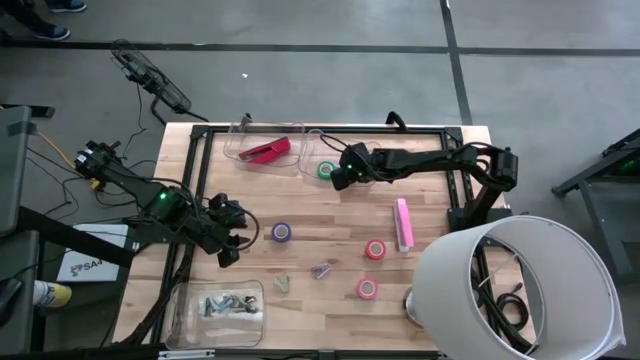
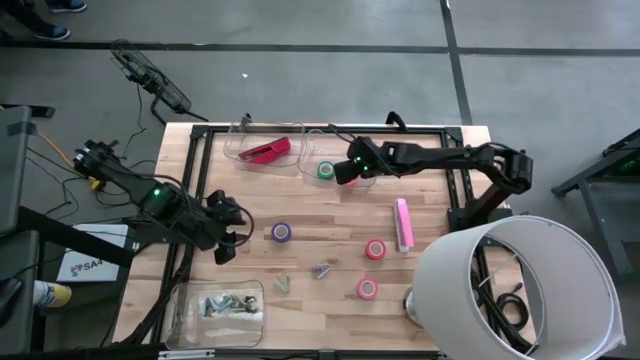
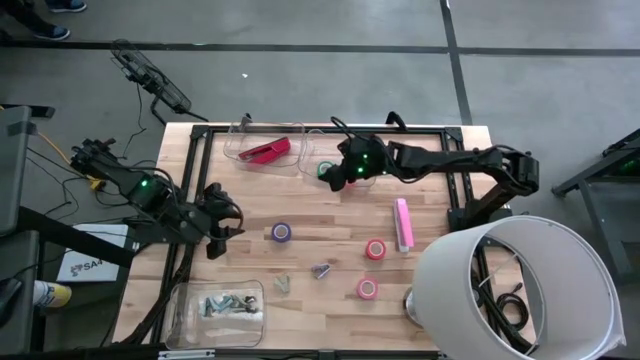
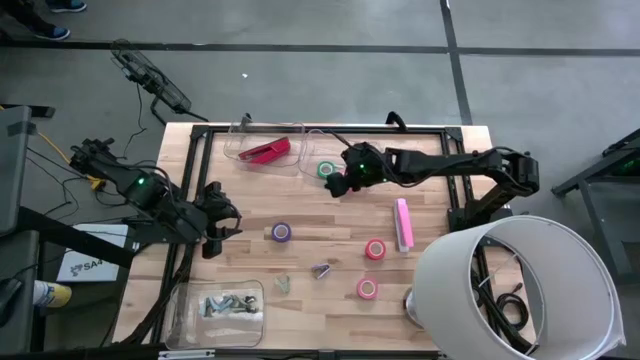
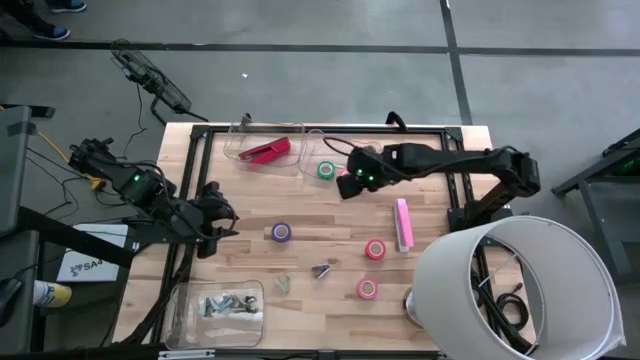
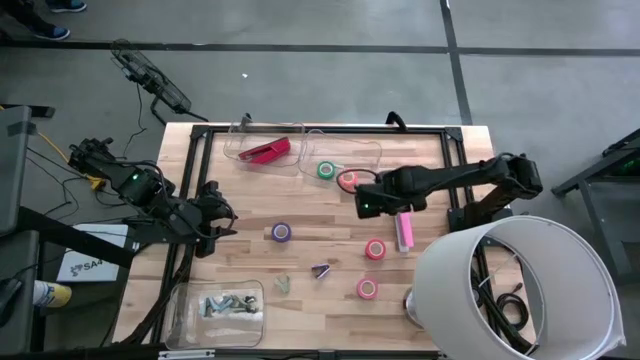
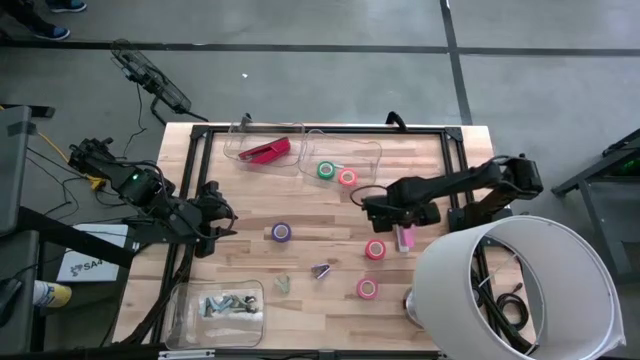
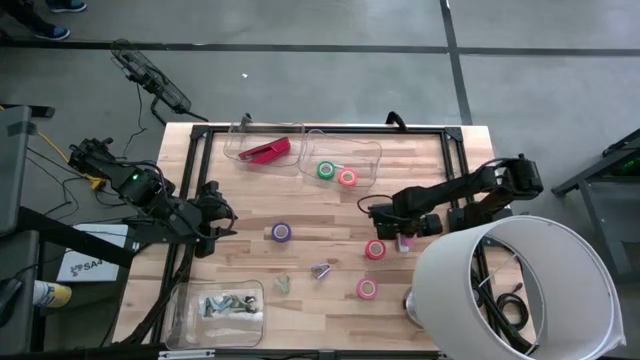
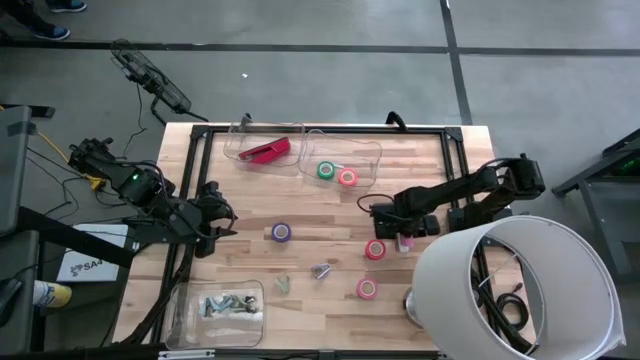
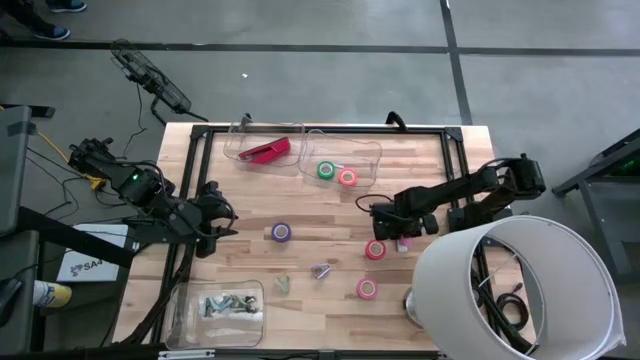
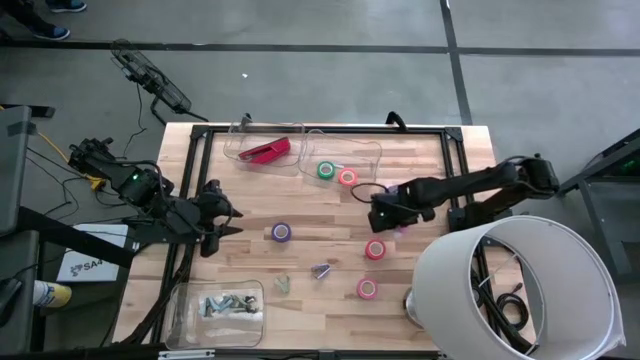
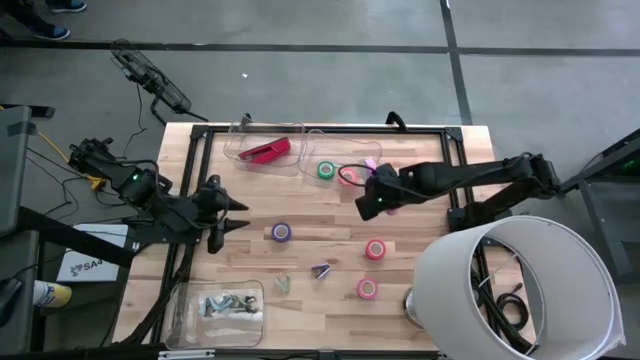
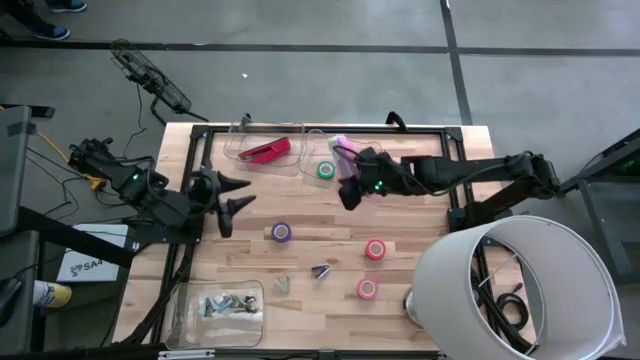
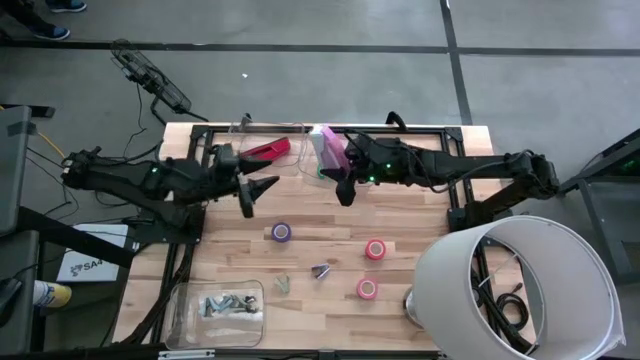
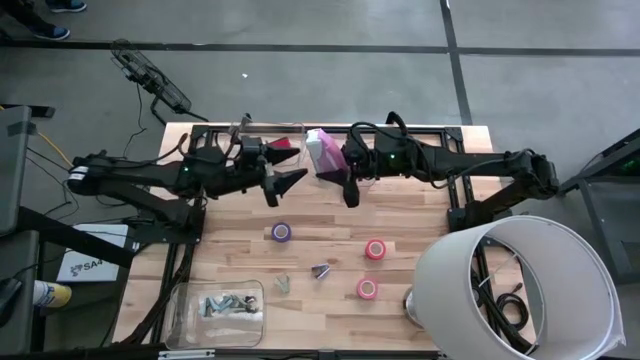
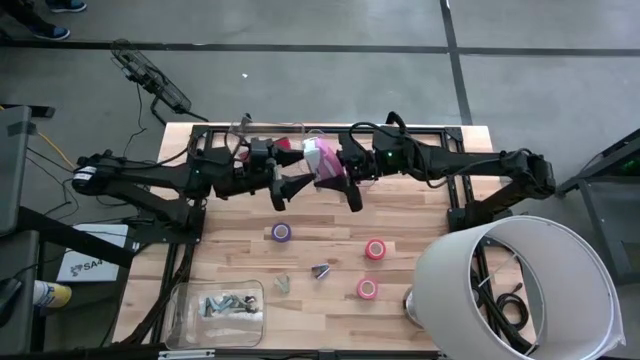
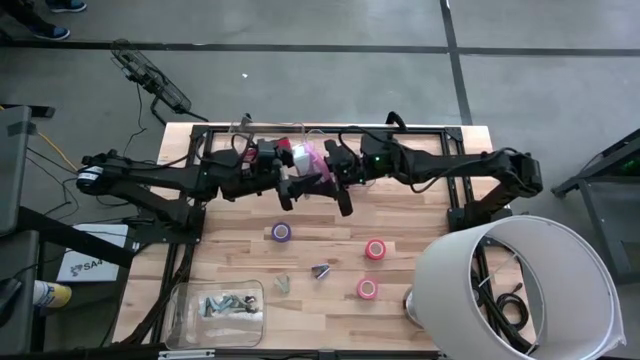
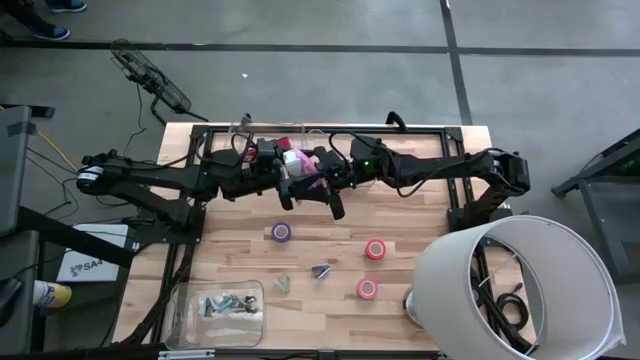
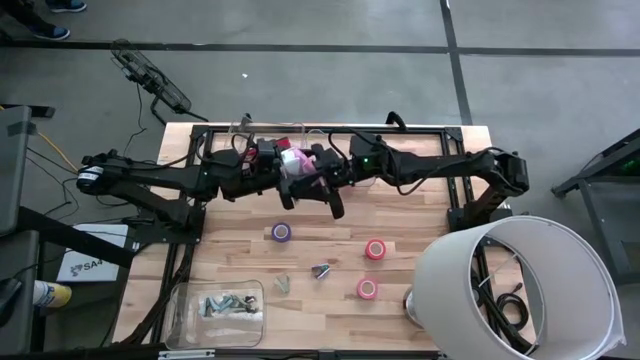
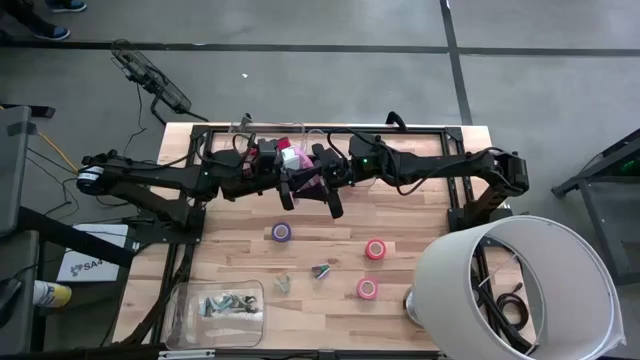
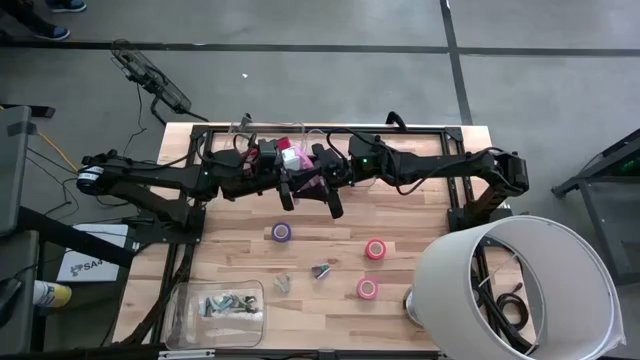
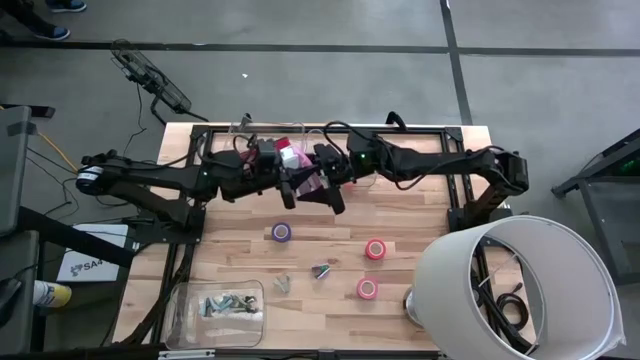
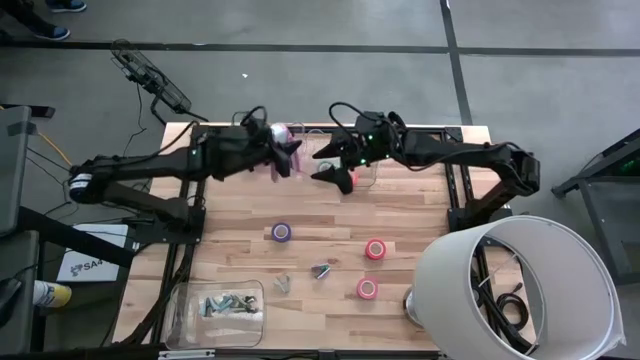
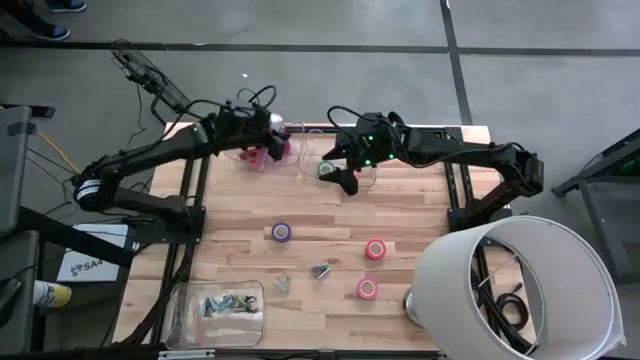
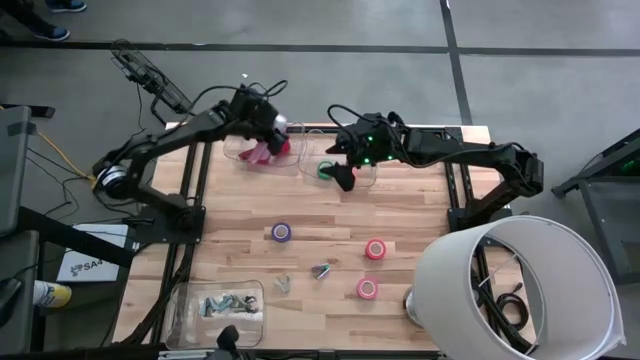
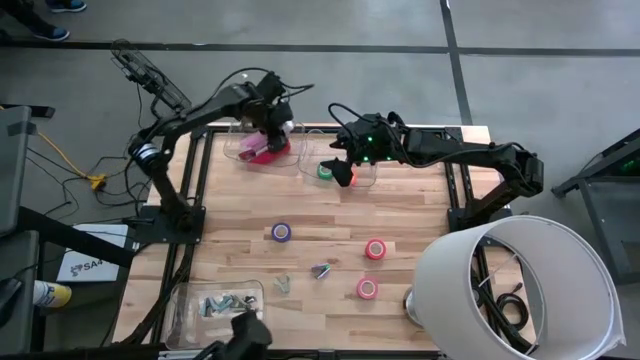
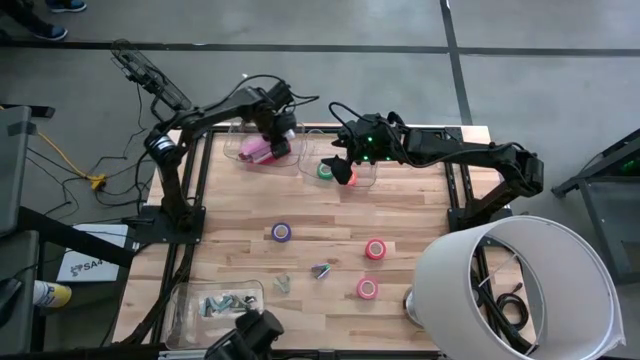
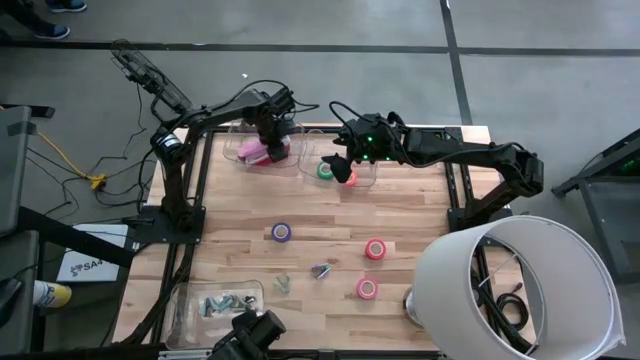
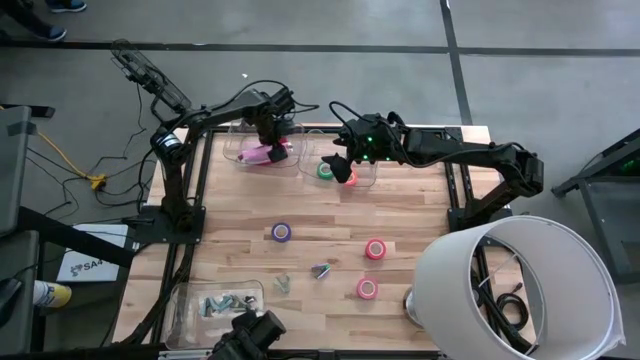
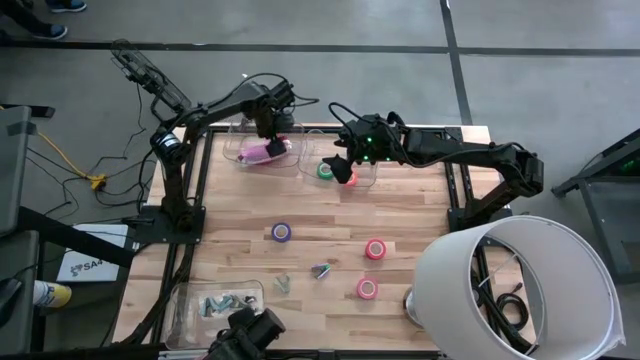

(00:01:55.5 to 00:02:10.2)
Task: Pick and place Stapler, Stapler remover, tape
Put the pink stapler into the top left transparent bin

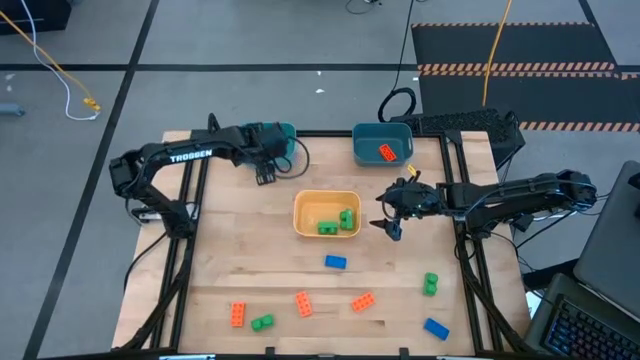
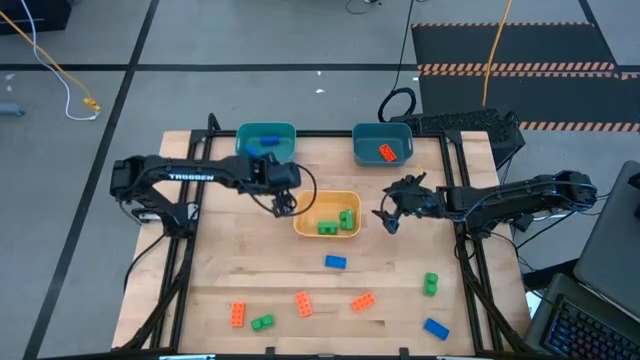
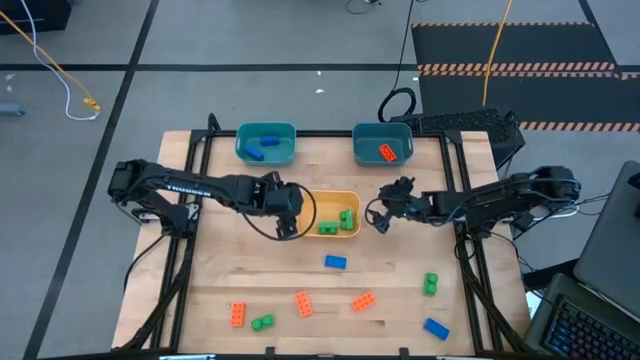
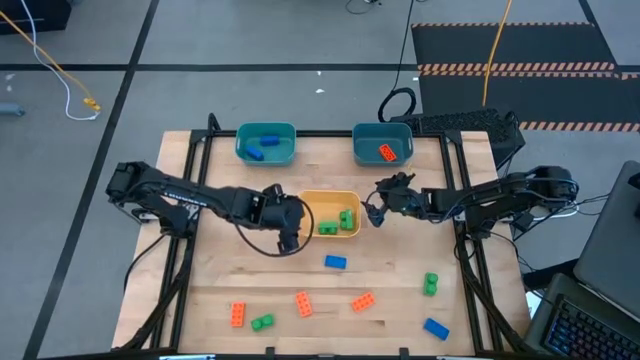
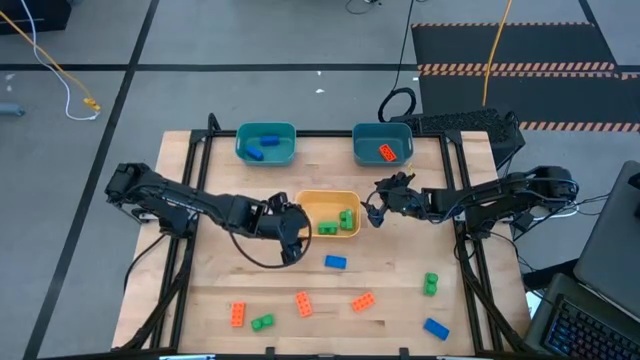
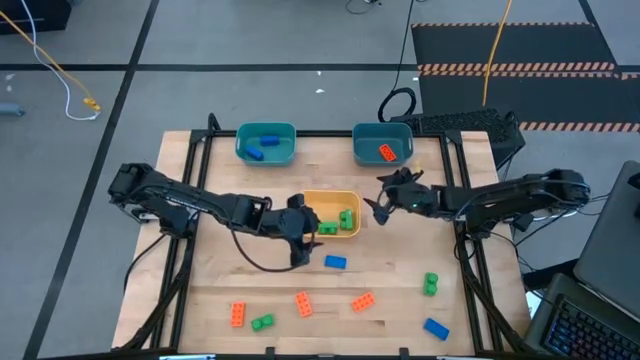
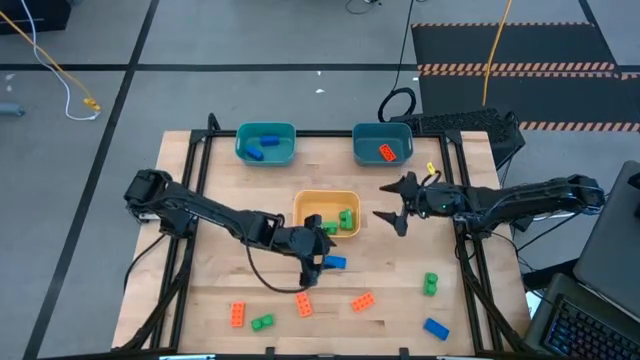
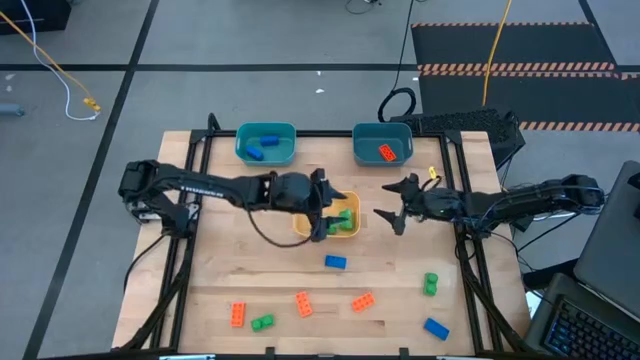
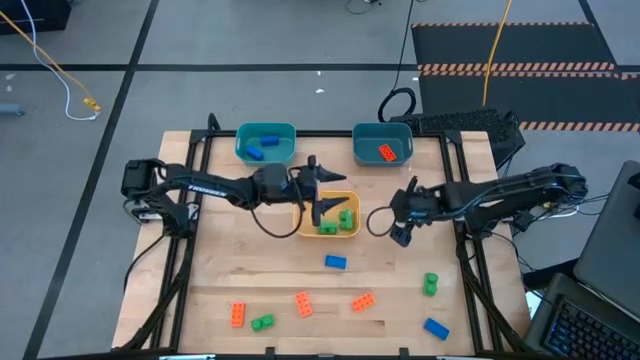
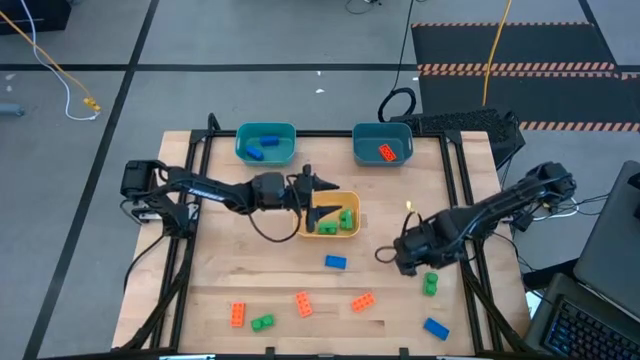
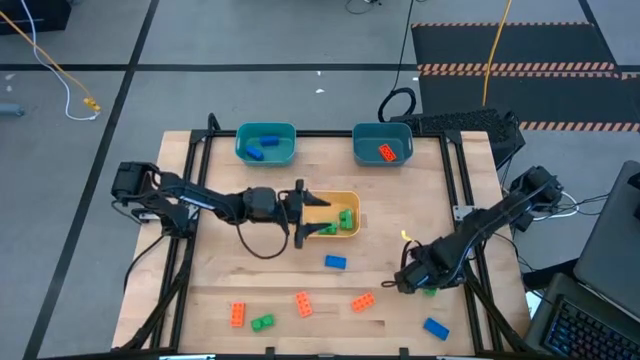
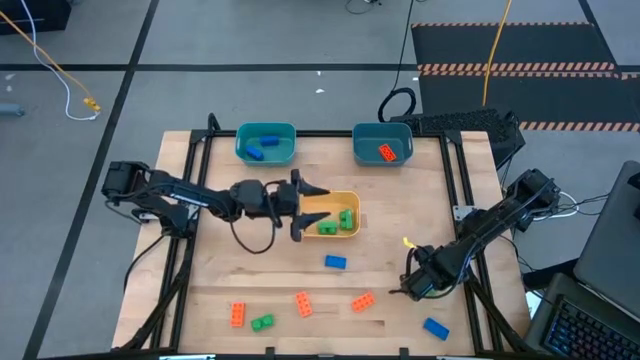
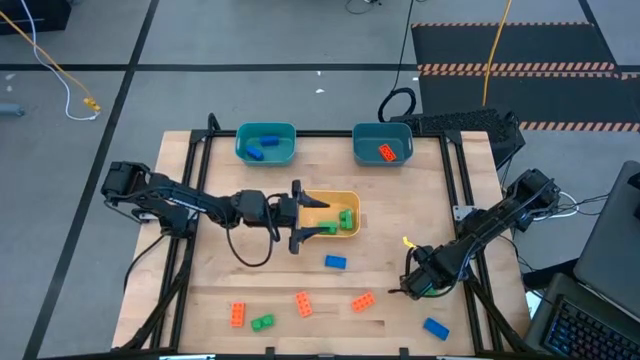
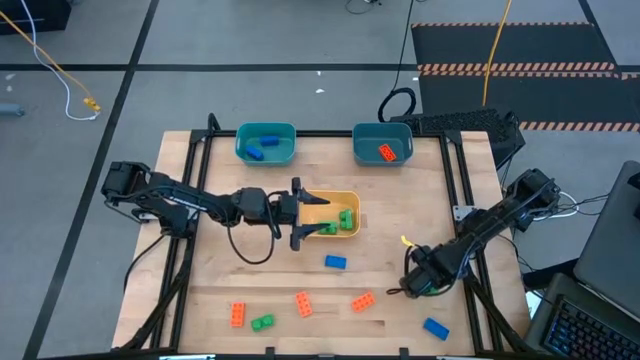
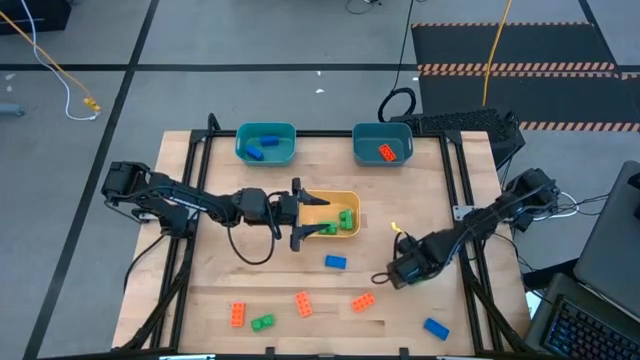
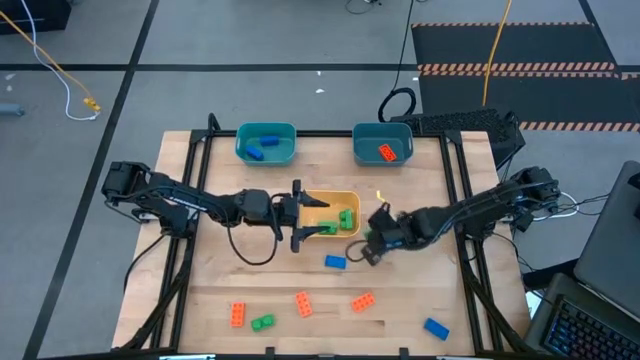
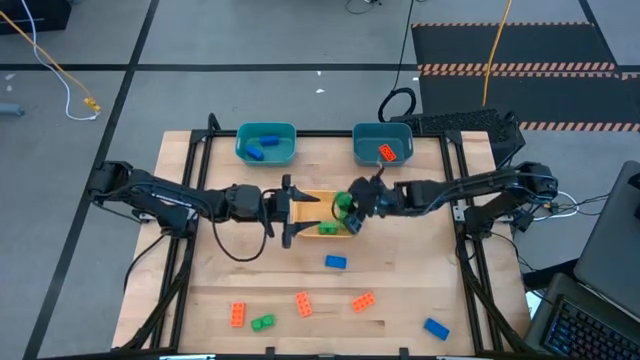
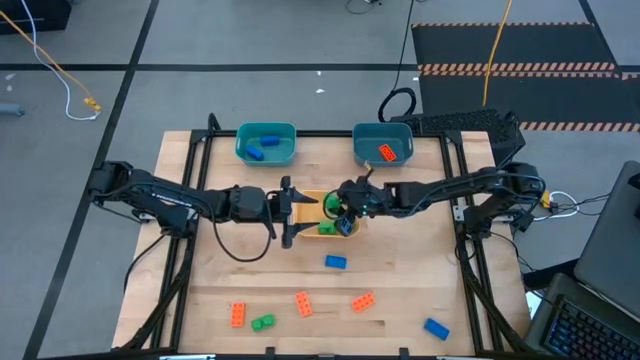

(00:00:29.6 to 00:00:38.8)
Task: Sort & place blocks by color
Put the green game piece into the yellow bin
